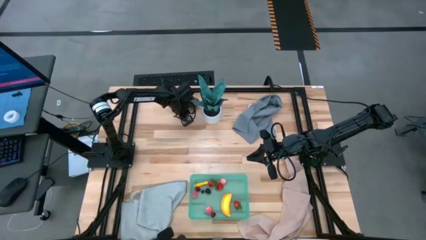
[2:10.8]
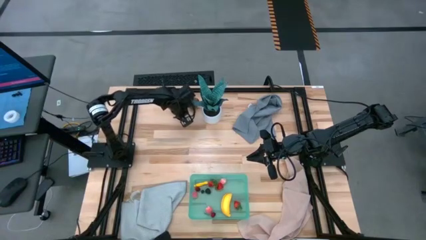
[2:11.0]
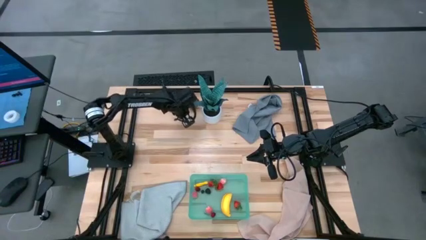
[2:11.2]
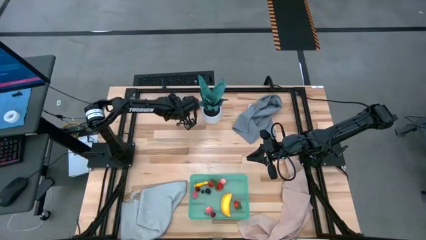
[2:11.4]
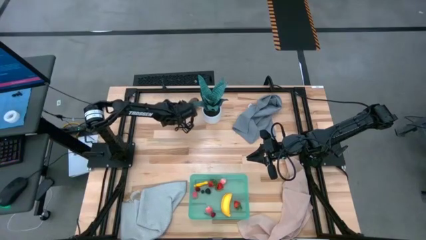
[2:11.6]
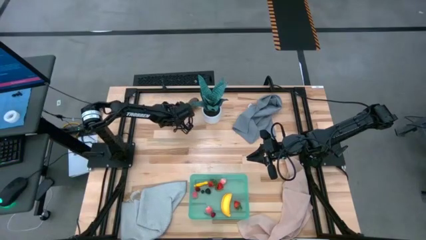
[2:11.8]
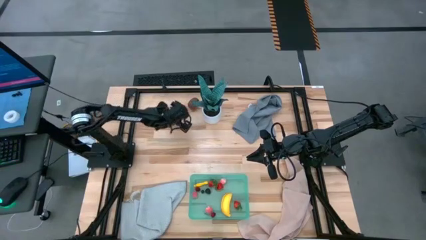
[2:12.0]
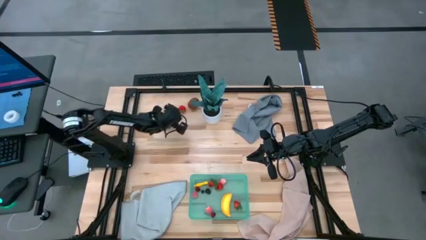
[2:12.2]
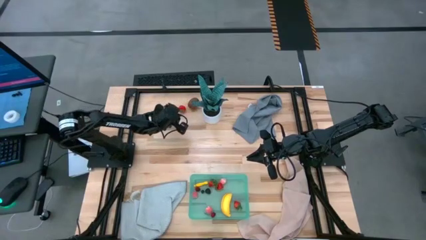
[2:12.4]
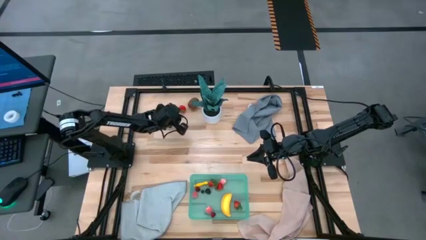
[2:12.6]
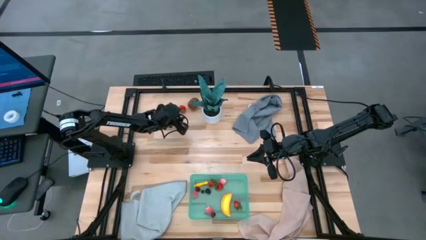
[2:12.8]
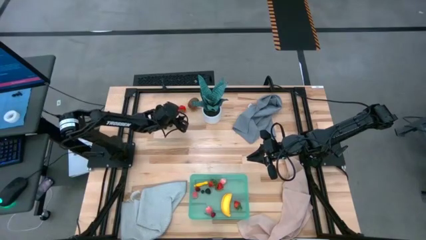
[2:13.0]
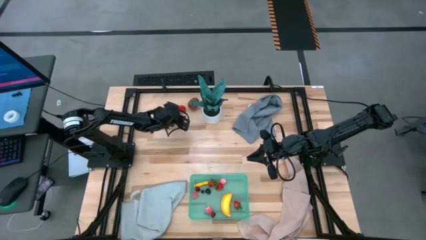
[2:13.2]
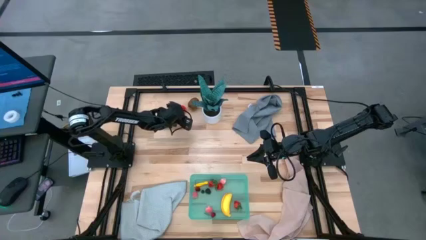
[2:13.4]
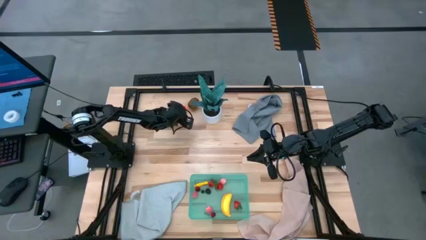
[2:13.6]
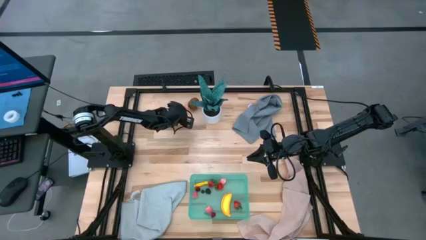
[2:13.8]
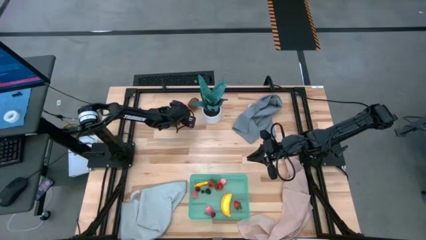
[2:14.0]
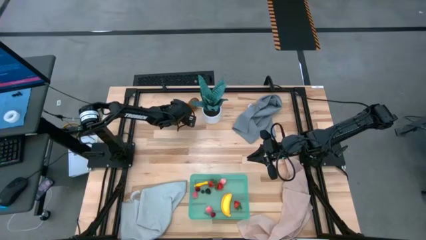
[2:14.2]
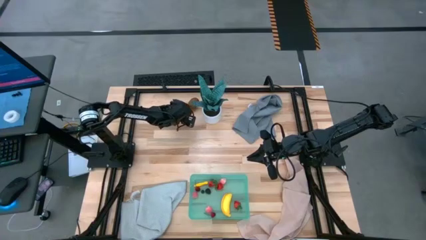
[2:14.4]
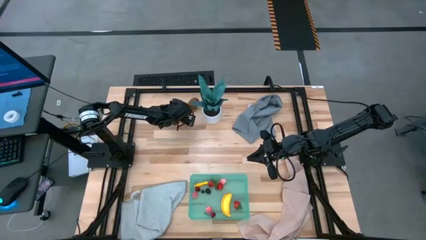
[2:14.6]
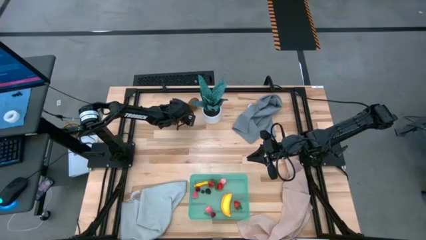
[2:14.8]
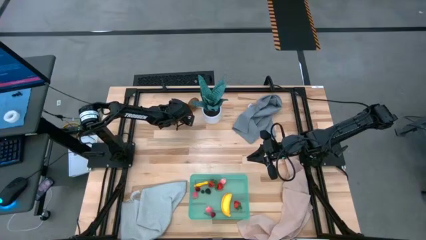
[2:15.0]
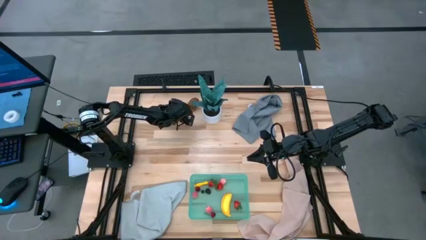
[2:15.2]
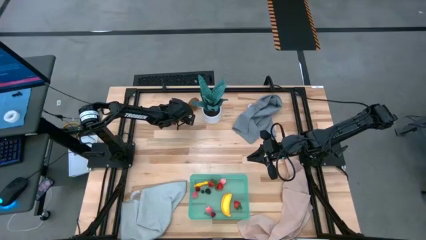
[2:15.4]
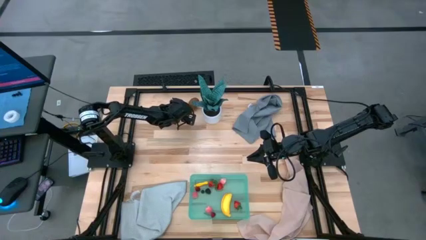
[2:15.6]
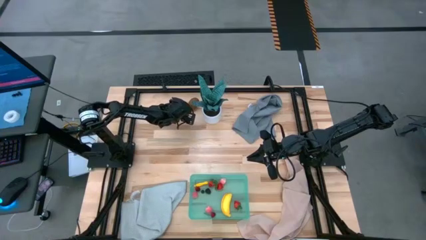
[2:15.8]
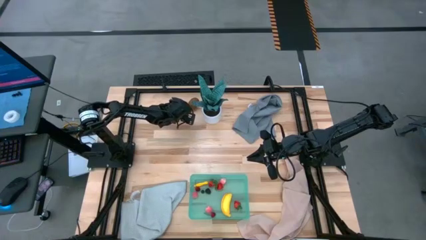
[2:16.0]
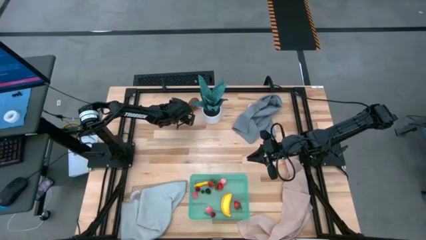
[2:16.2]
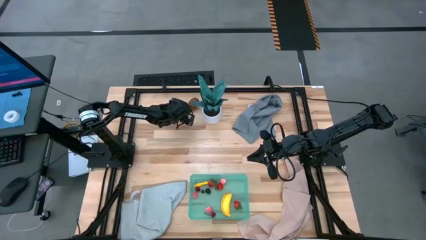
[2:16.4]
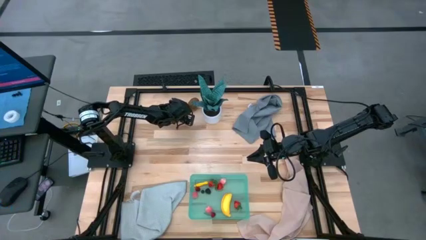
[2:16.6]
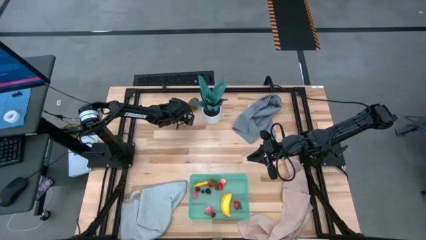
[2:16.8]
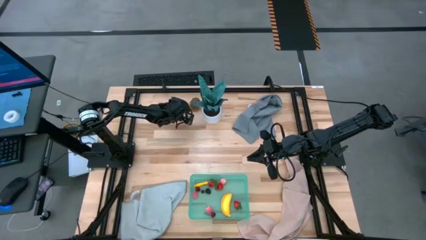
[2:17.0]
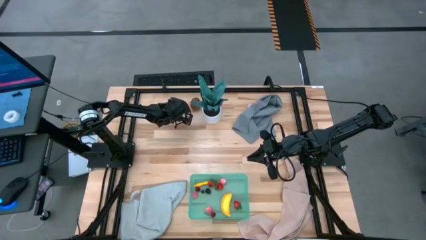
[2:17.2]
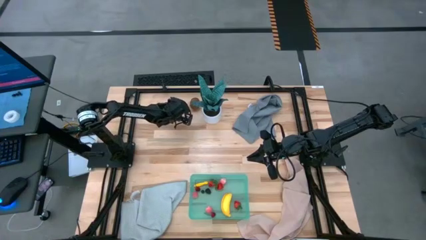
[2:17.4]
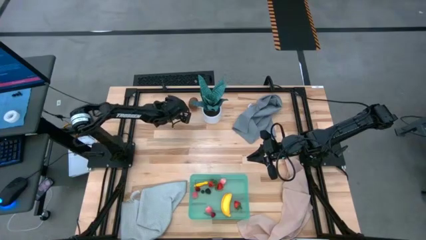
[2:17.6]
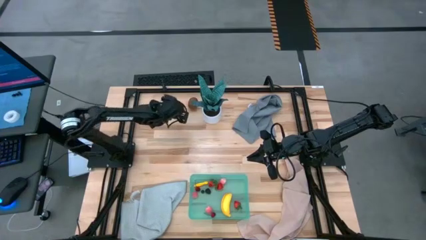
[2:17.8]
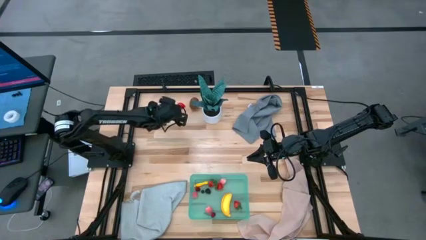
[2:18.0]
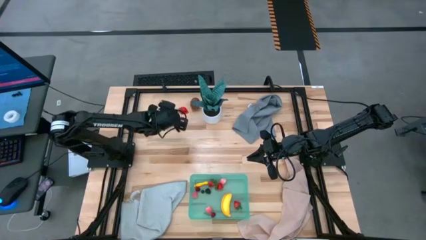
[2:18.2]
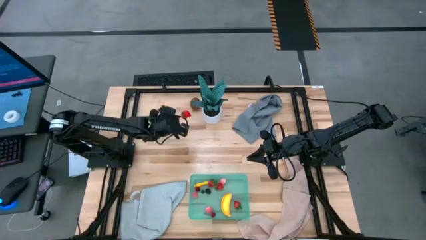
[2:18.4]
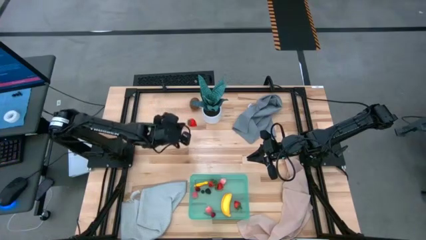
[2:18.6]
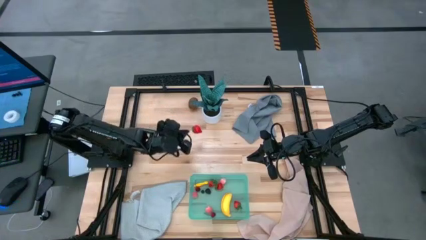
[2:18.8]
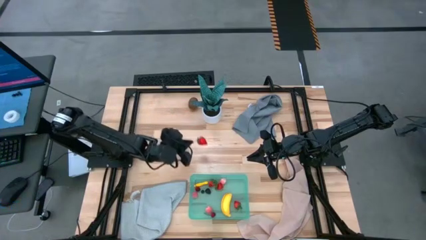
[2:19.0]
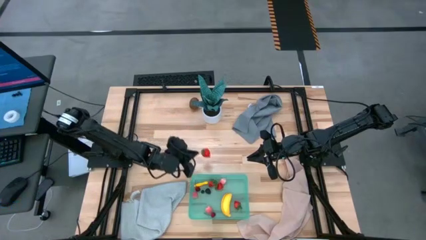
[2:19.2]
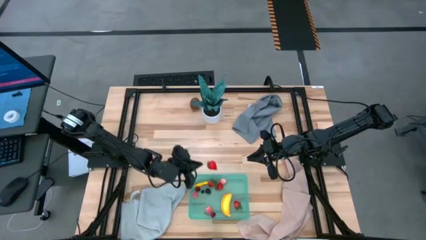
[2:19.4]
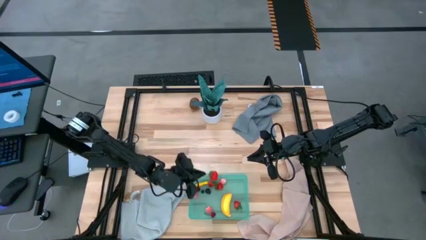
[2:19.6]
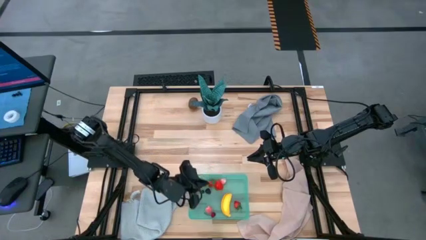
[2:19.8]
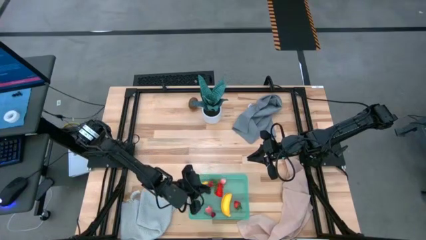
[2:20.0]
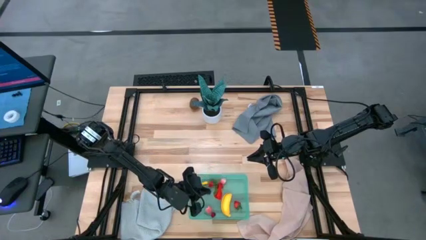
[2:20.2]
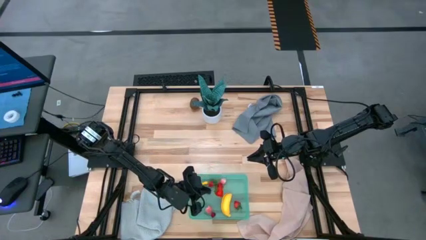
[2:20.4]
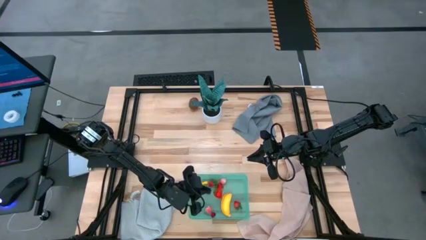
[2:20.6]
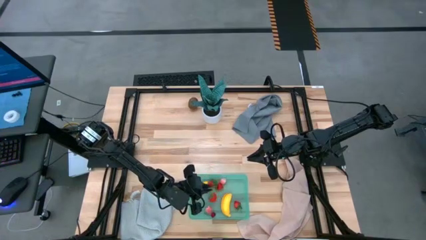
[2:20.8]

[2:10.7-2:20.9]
Task: Pick and placing Produce into tupperware
Put the red strawberry into the green bin
